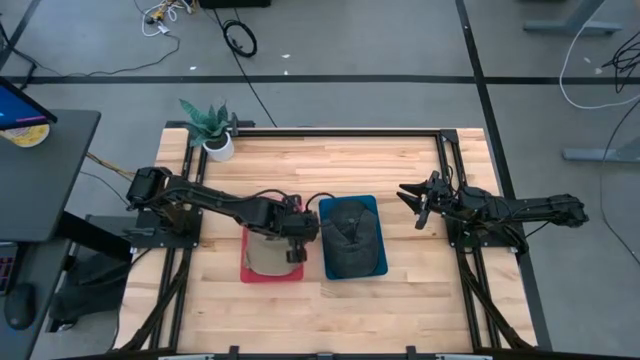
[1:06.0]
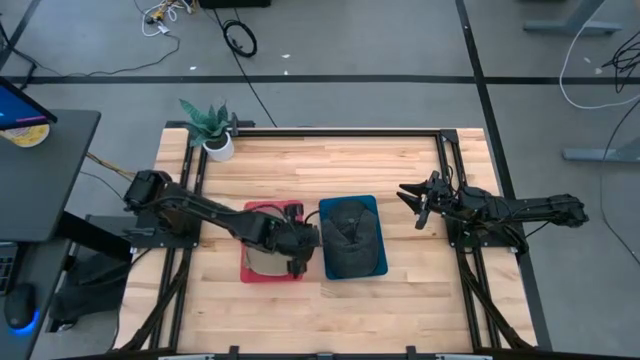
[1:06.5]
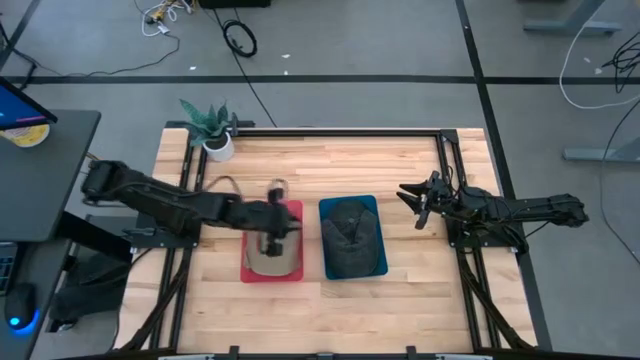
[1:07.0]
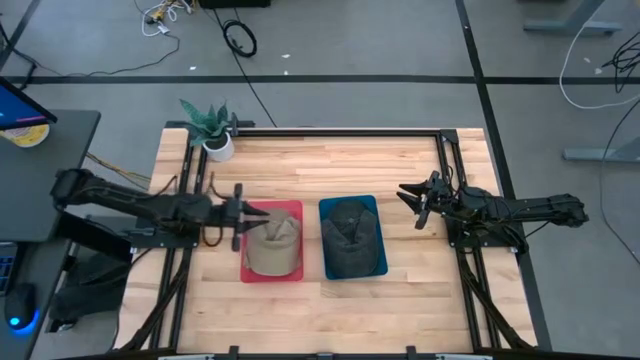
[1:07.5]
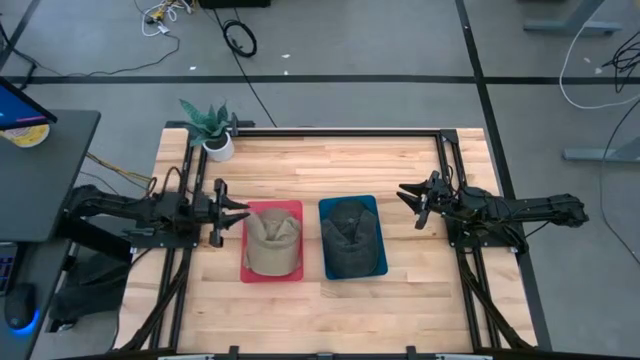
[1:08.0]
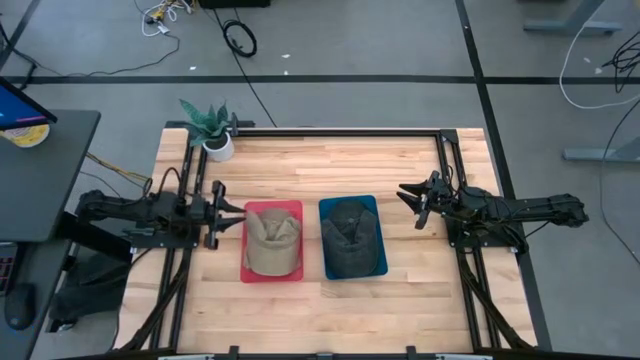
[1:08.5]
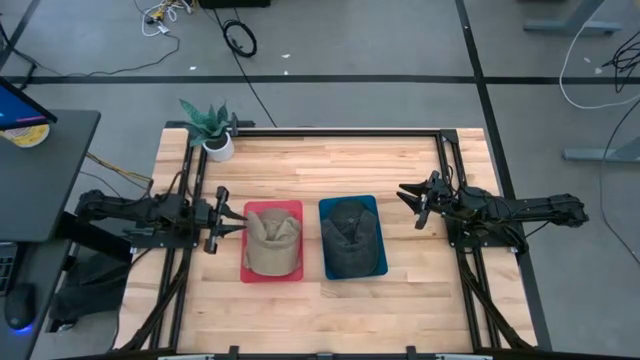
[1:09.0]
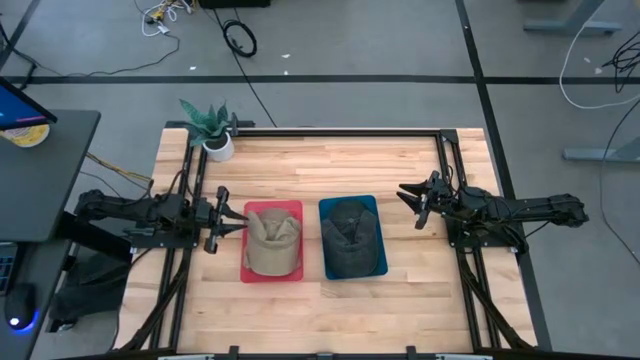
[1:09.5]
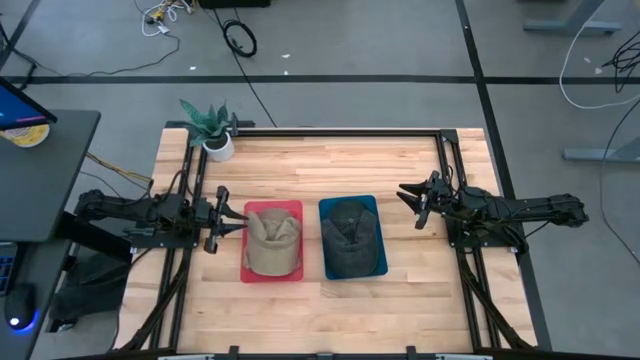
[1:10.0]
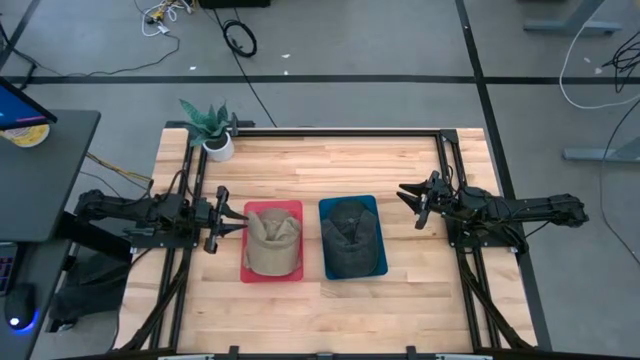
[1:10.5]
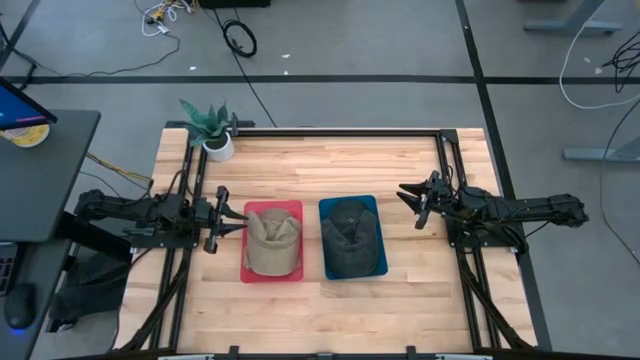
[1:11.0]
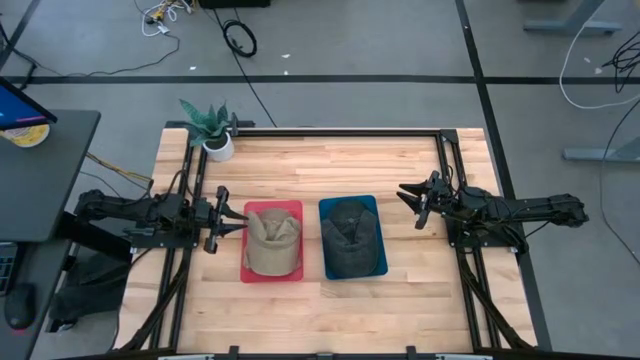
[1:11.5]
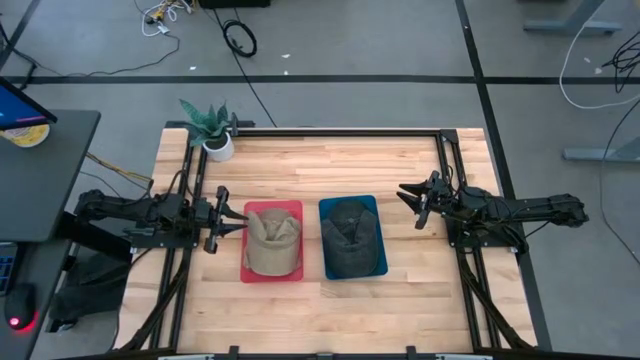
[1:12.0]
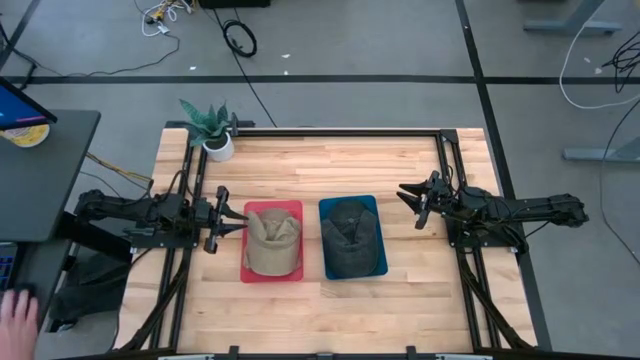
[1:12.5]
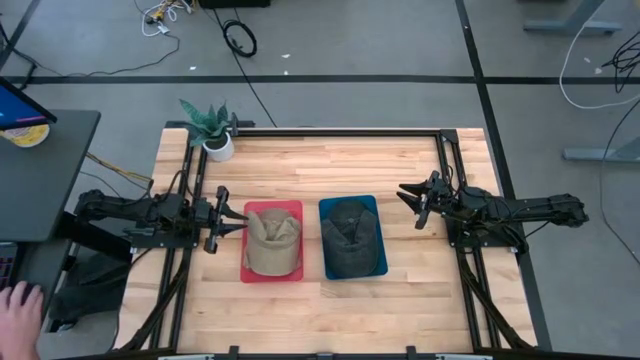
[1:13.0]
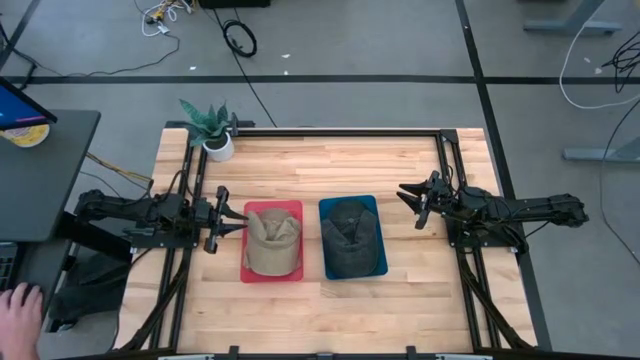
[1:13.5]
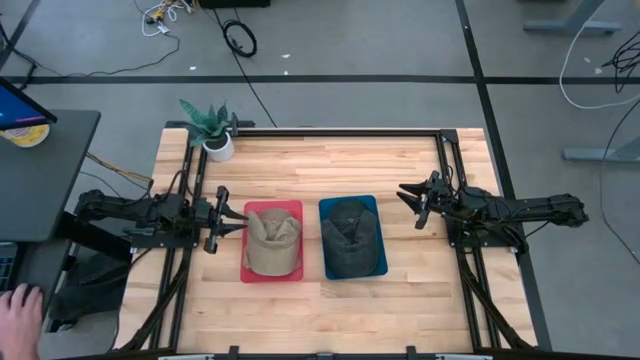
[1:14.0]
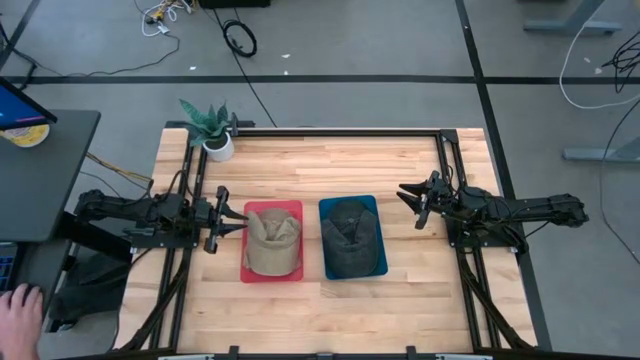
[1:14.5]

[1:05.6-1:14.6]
Task: Pick & Place hat
Return to Home Position

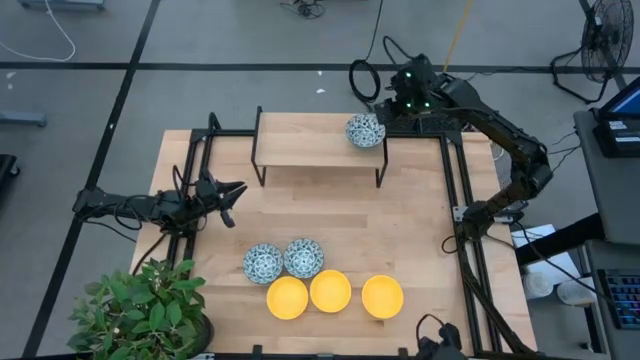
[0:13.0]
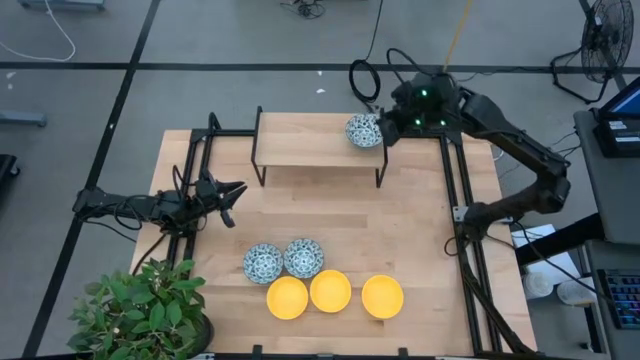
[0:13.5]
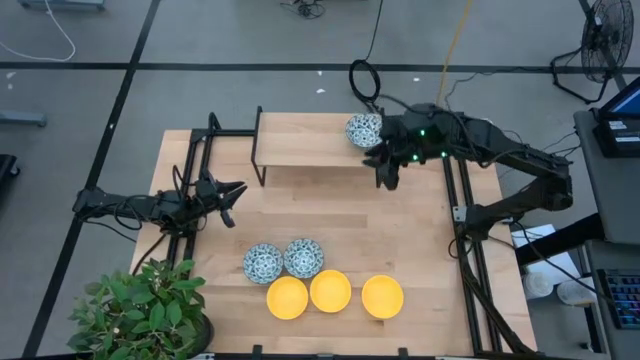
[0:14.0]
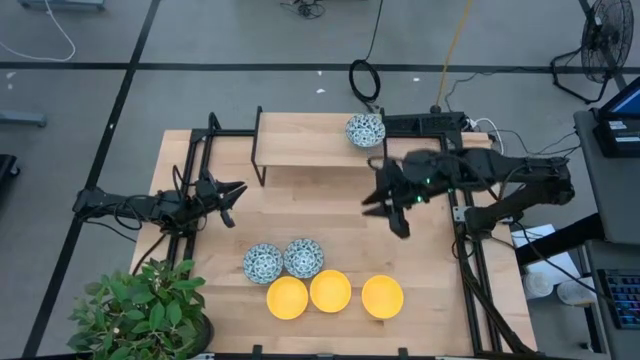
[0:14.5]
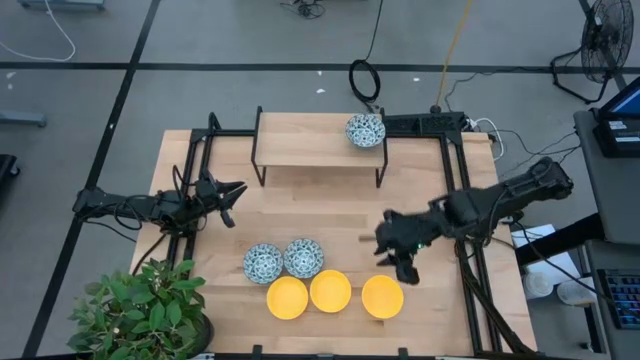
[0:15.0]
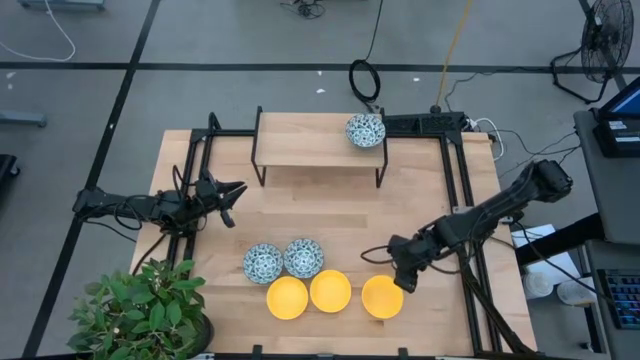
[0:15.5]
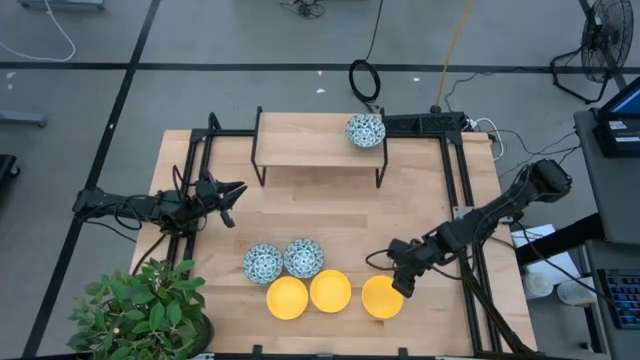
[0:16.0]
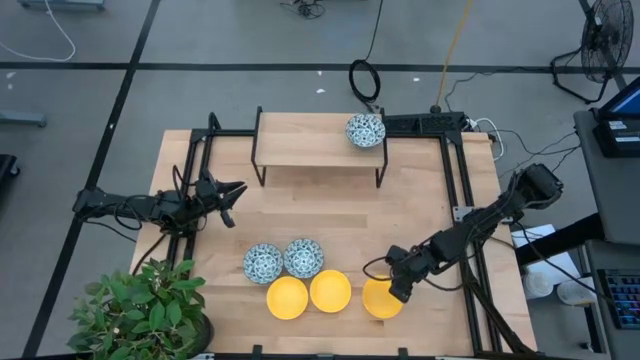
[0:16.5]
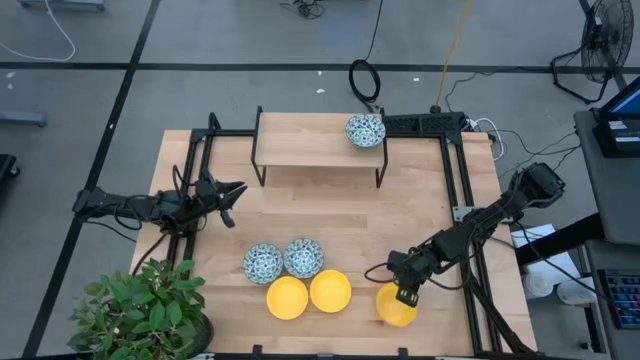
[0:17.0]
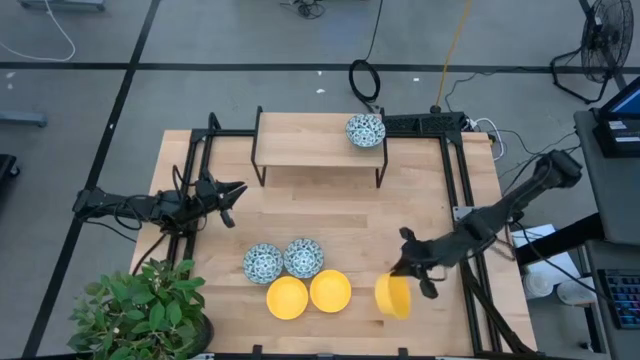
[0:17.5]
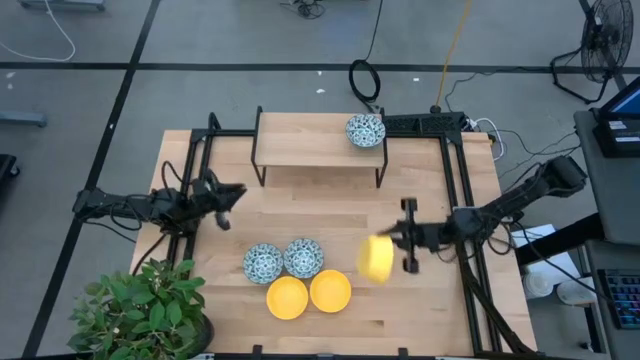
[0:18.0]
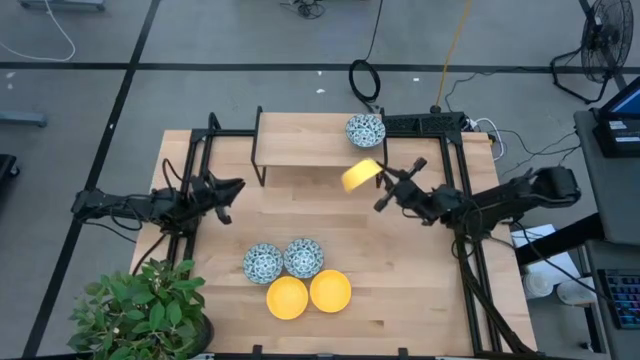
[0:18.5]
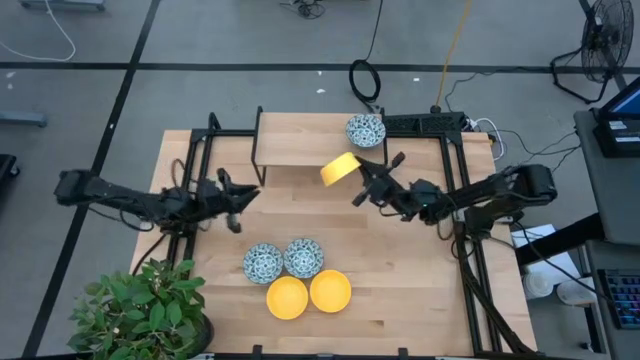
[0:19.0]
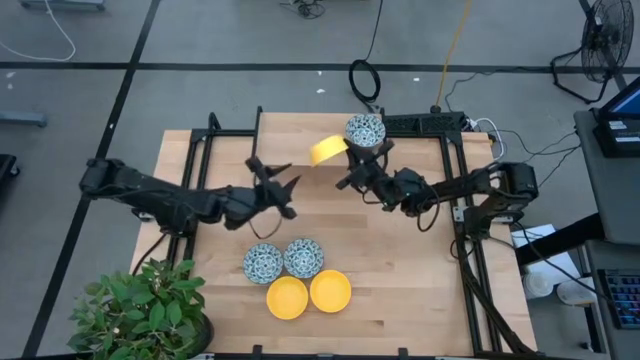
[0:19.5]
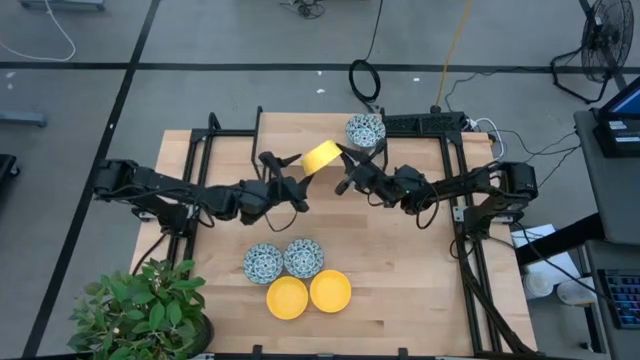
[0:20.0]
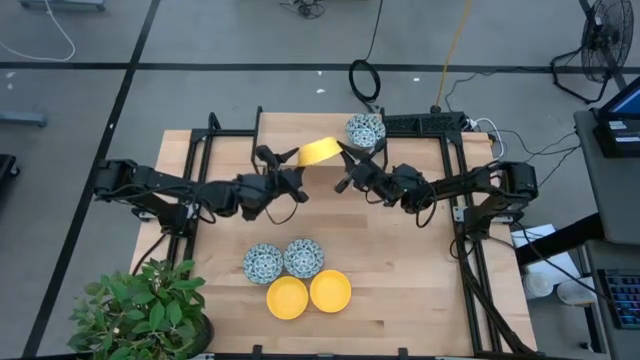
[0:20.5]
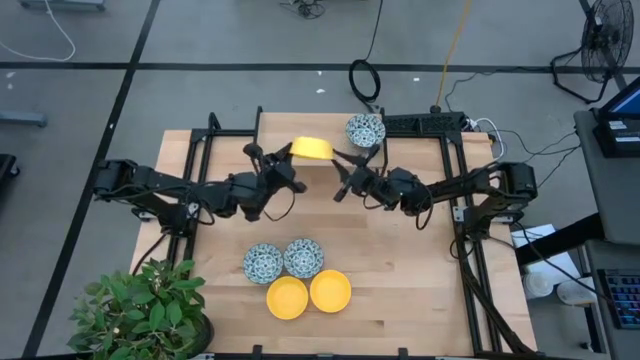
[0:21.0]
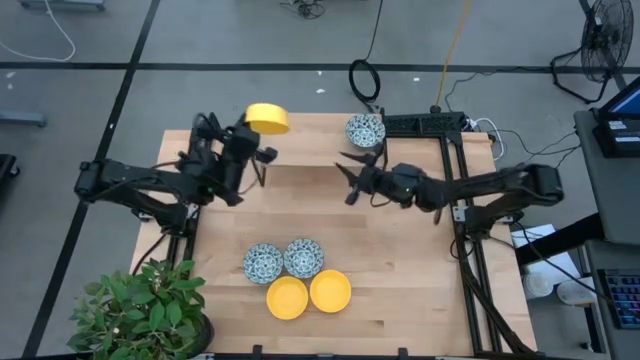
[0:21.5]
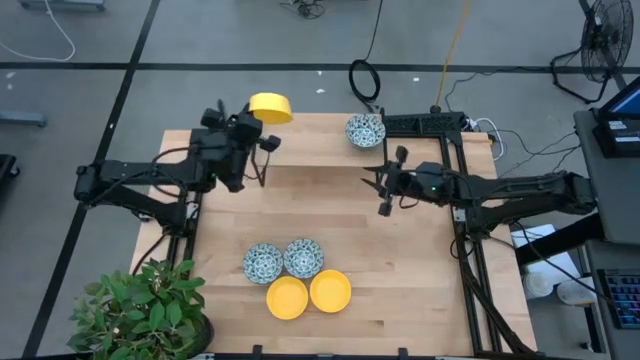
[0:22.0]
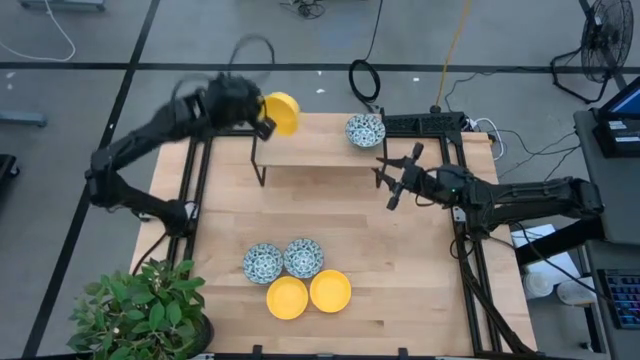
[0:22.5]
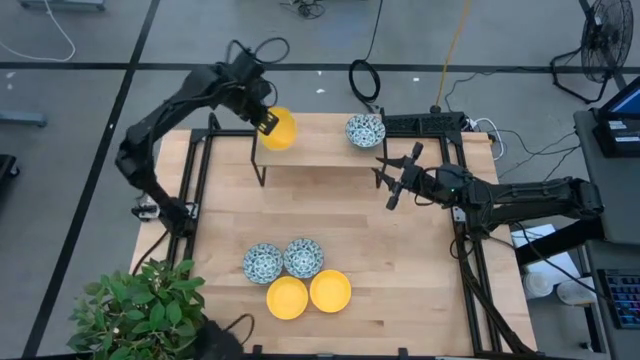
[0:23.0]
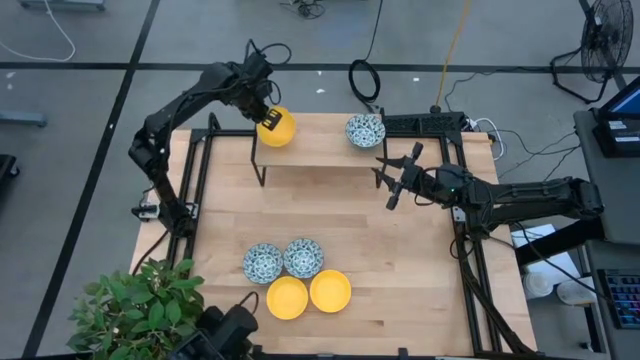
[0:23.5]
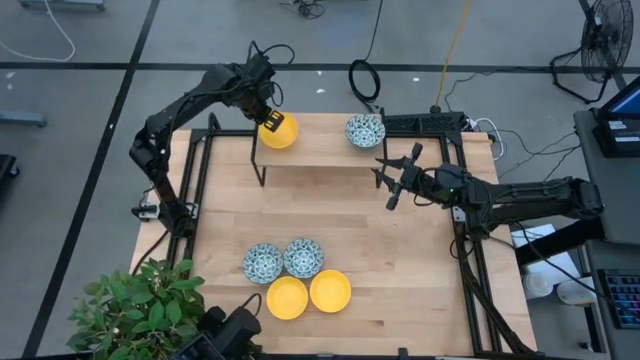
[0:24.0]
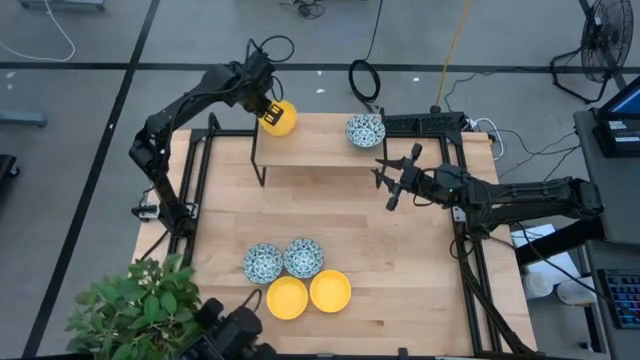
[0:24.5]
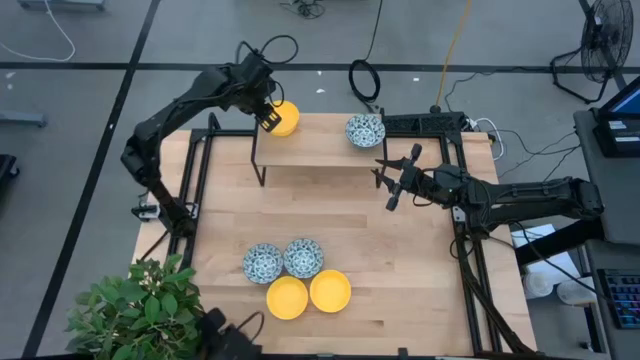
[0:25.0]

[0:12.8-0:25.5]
Task: Pick & Place Mini bowls
Put the right yellow bowl on the shelf

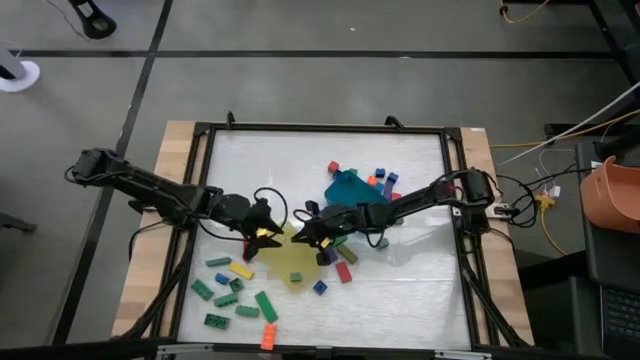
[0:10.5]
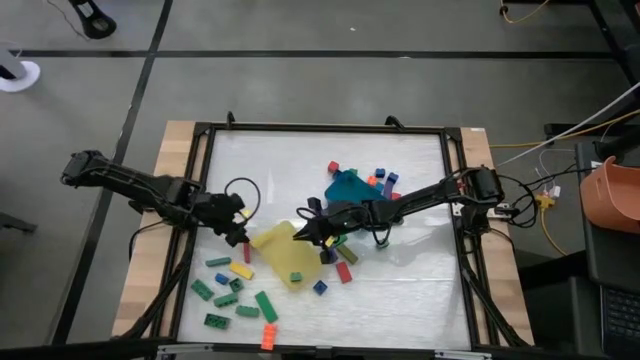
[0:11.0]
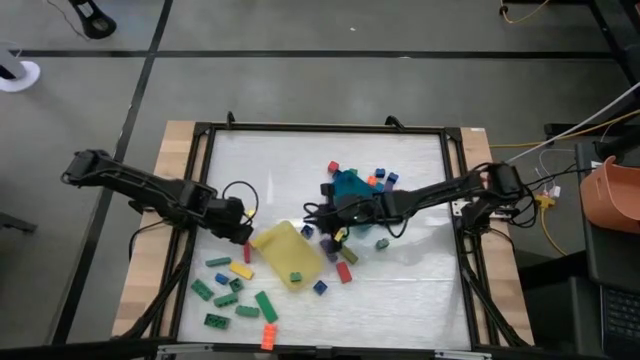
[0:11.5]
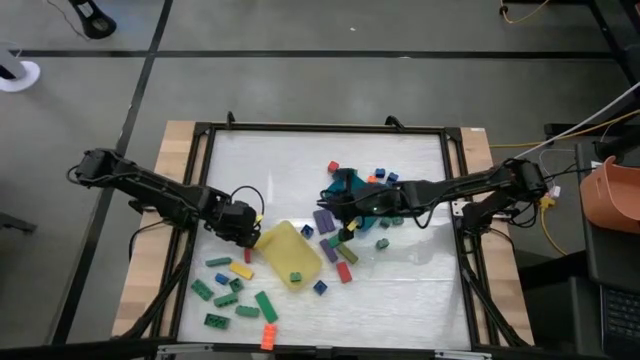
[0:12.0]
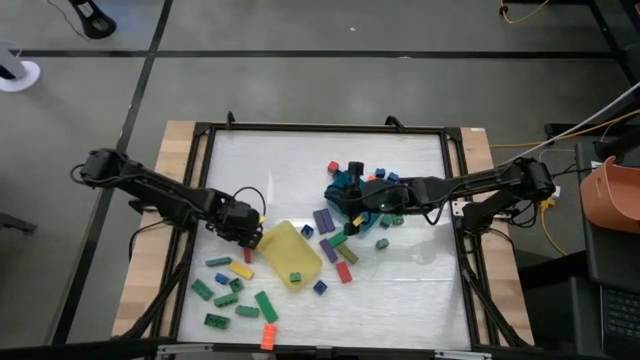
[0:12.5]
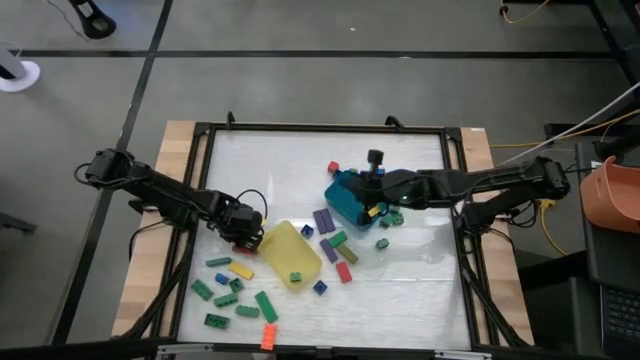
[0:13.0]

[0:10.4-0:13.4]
Task: Sort blocks by size
Put the large red wooden block into the blue bin
